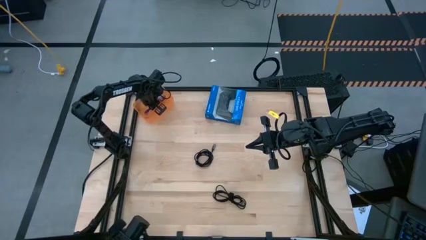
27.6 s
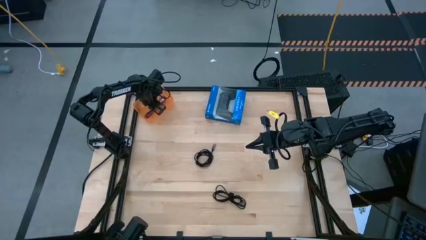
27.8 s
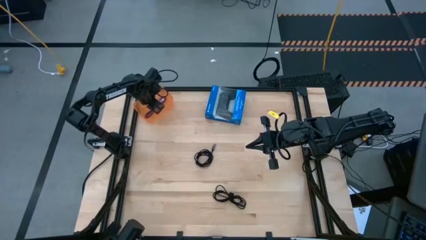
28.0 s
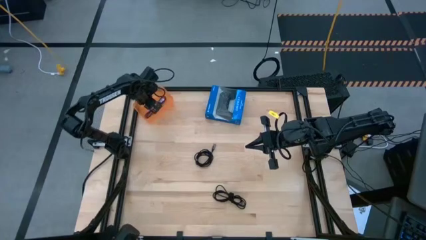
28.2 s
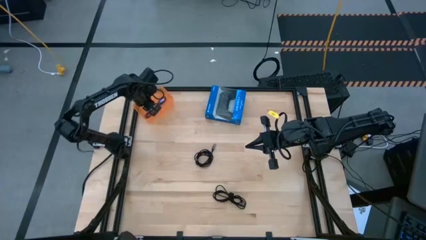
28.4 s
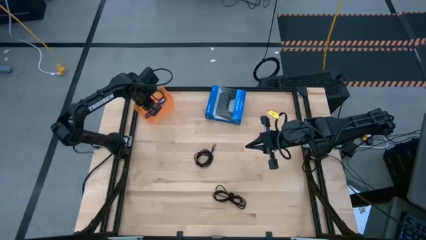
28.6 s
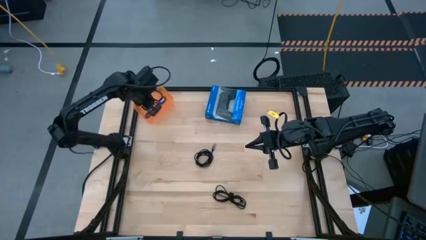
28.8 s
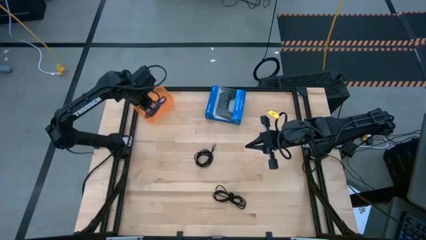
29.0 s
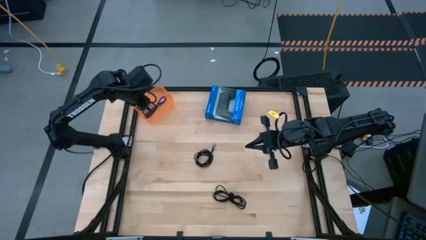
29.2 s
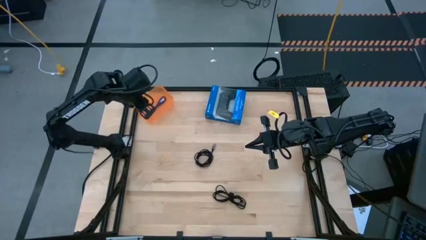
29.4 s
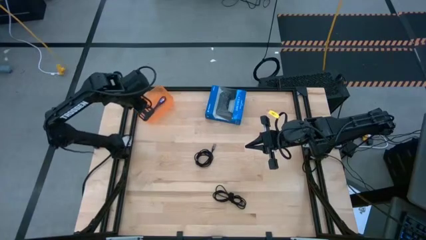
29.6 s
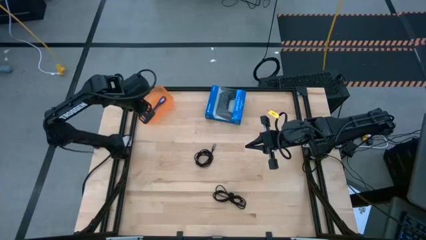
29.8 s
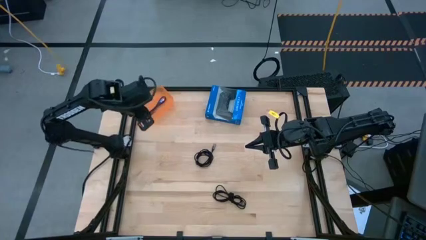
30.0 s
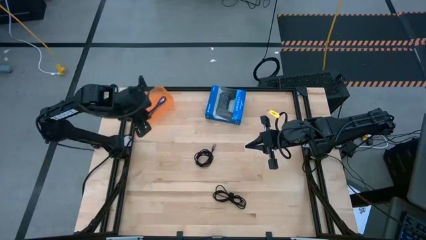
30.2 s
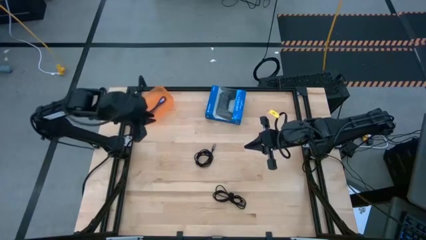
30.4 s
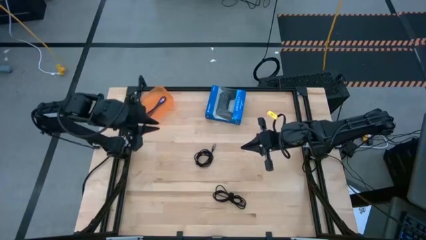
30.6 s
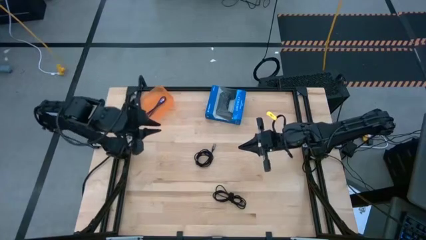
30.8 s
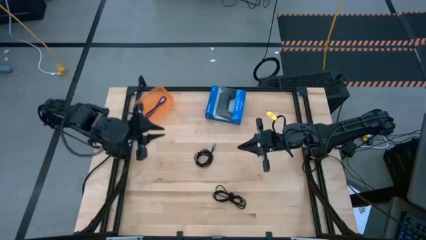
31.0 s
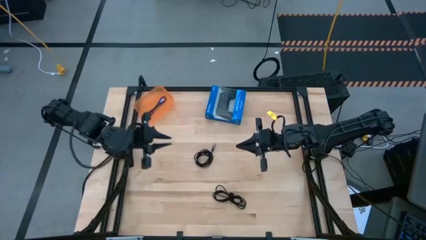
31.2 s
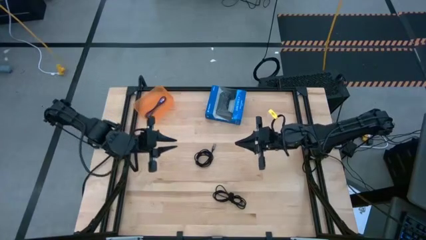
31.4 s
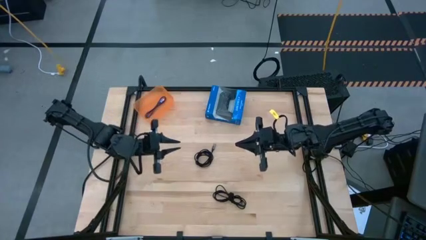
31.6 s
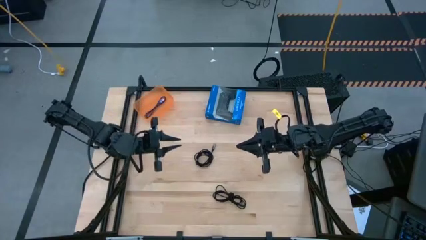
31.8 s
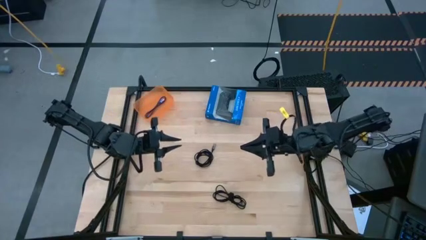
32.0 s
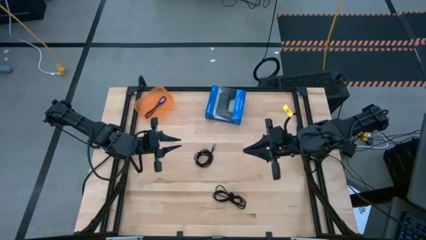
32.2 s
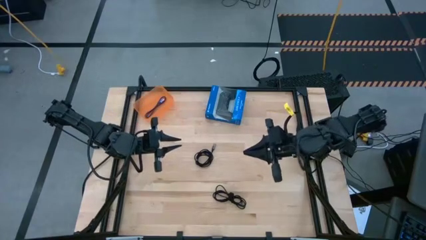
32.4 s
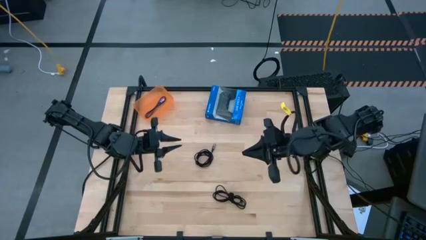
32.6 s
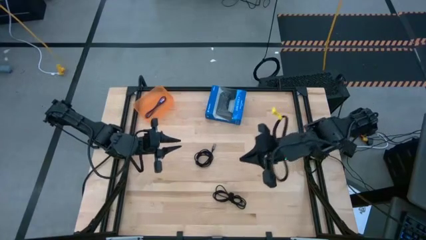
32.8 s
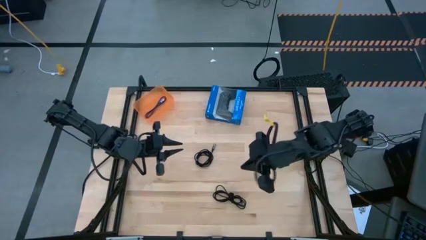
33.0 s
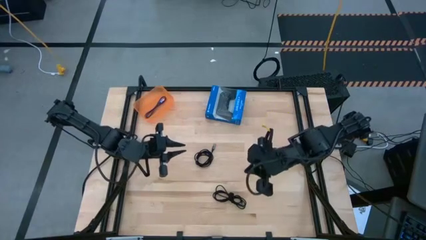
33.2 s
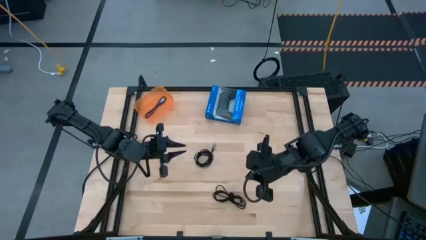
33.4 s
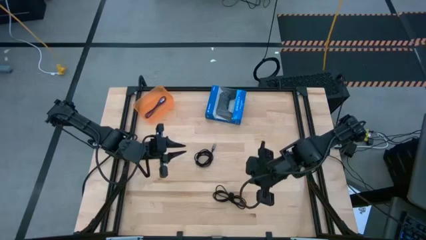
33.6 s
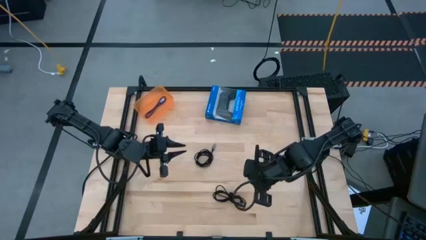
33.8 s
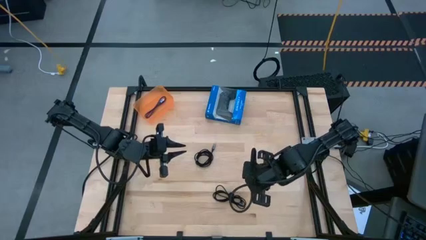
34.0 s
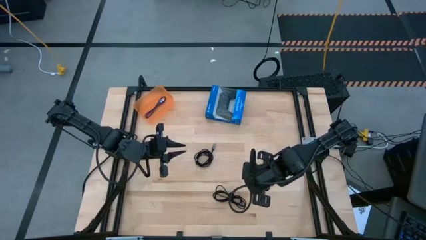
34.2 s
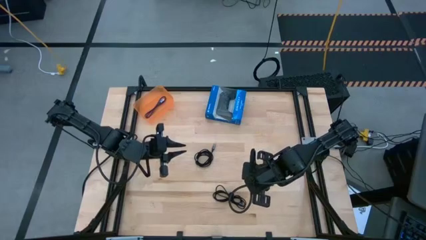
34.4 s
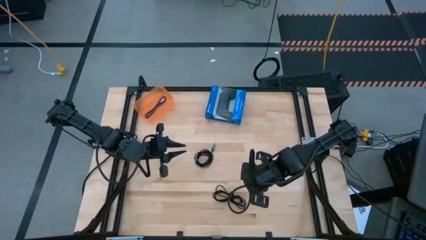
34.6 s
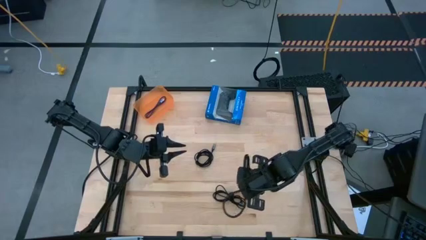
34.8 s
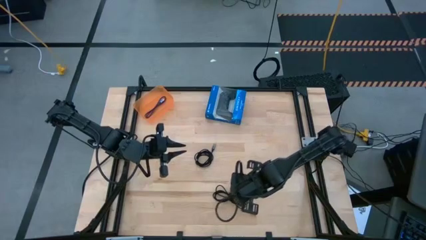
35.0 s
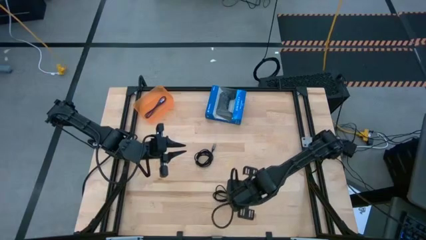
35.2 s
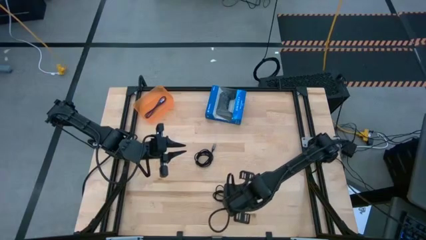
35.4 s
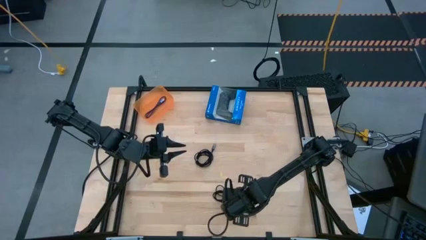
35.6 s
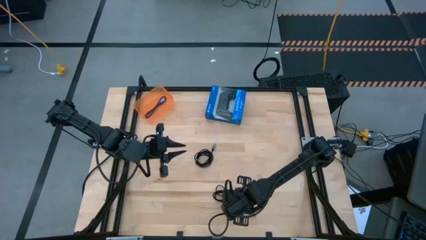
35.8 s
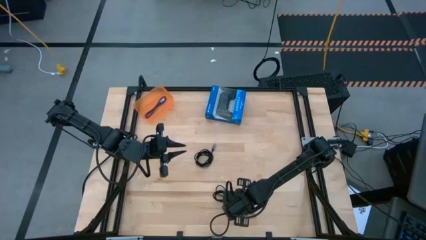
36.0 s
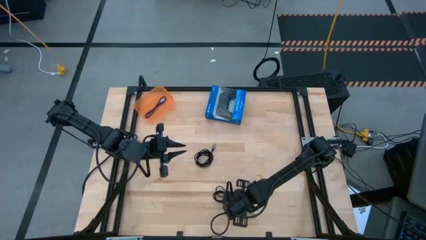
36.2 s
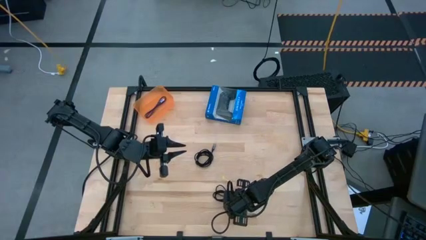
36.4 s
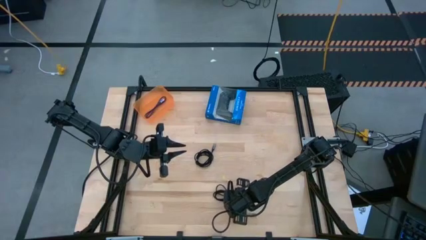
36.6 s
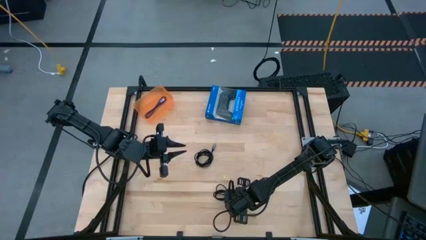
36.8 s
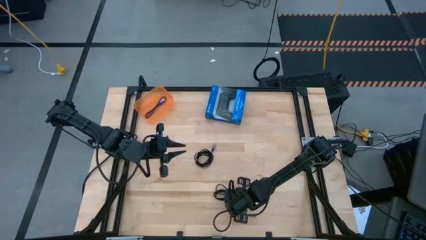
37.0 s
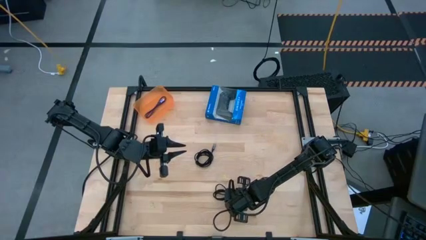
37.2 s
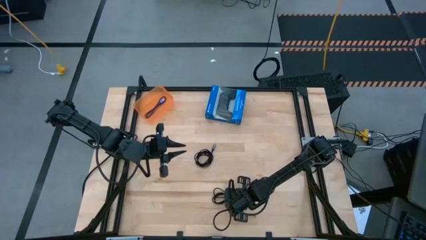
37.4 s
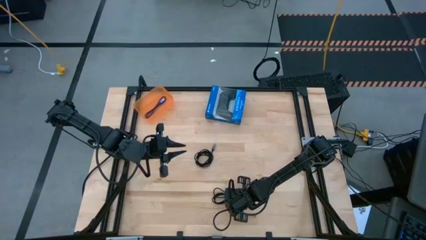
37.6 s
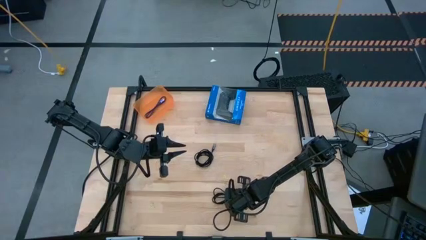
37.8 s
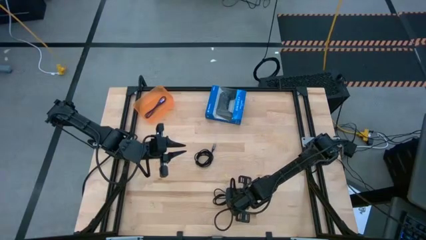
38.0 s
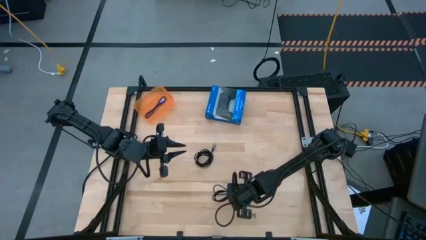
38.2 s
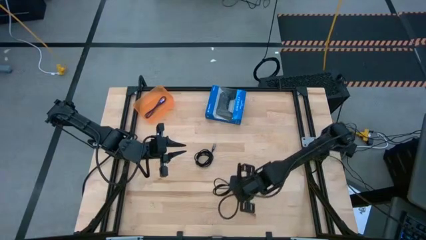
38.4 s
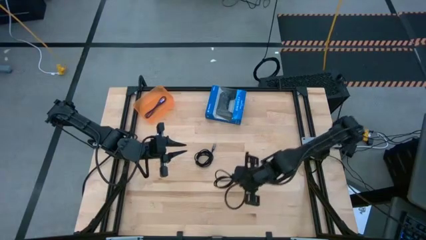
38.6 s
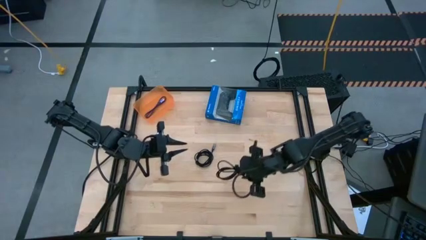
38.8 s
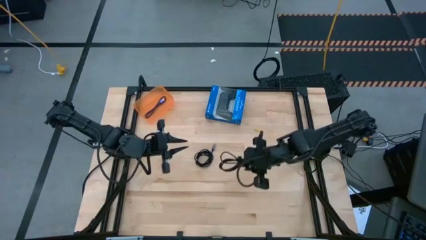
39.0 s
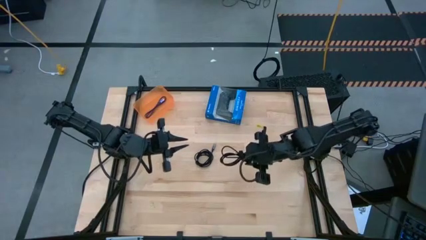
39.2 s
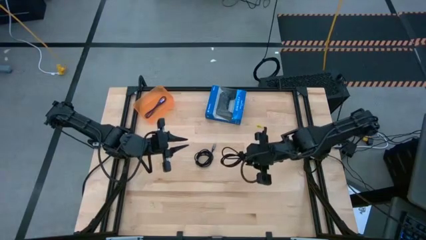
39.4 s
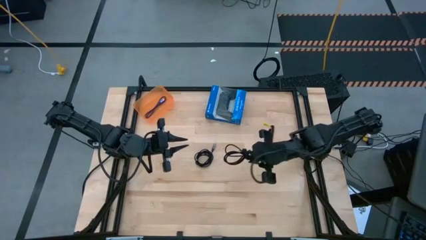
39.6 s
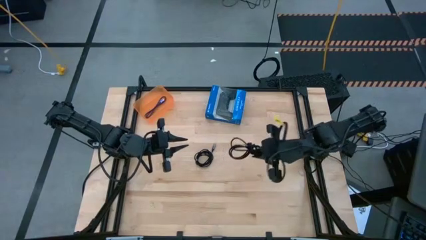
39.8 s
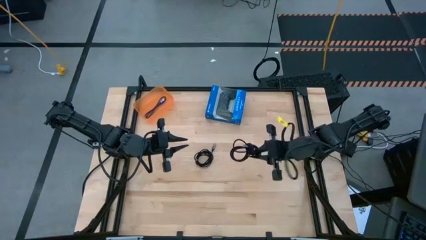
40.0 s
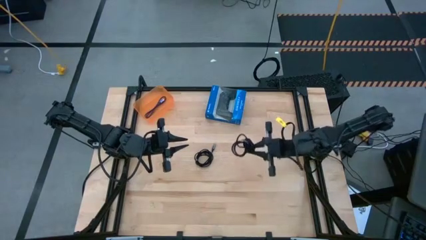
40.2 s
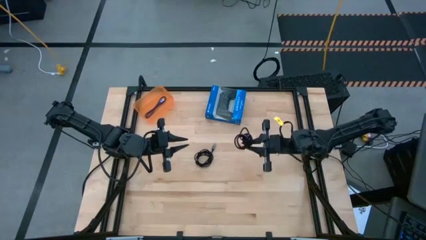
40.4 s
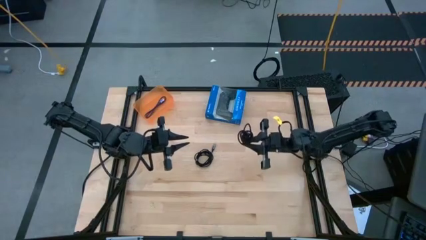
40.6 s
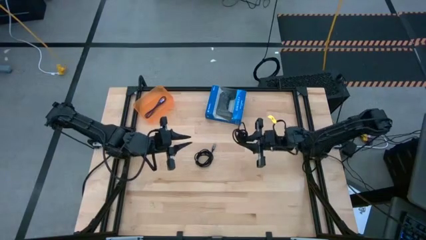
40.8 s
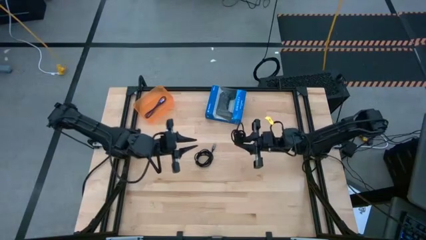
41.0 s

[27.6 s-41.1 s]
Task: Pick and place USB-C Cables
Put the bottom black charger cable into the orange bin

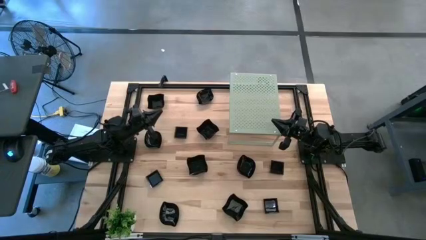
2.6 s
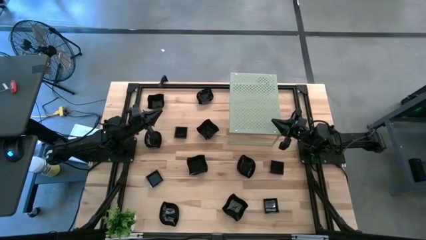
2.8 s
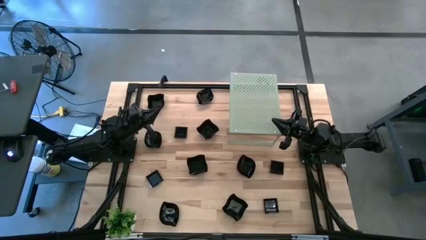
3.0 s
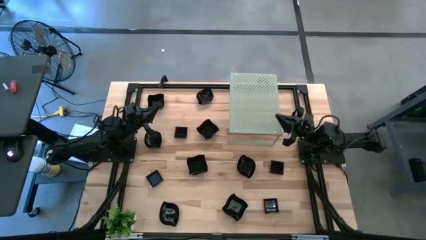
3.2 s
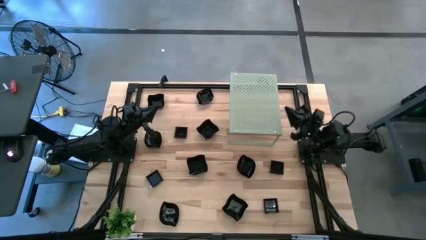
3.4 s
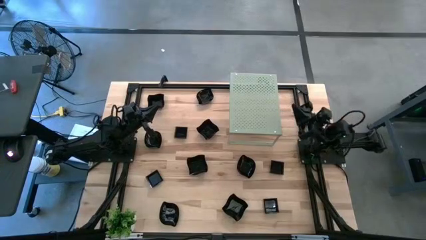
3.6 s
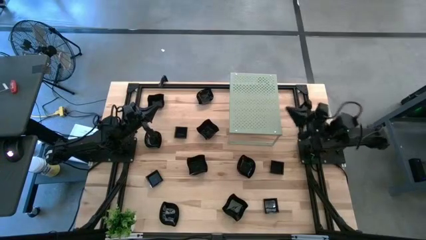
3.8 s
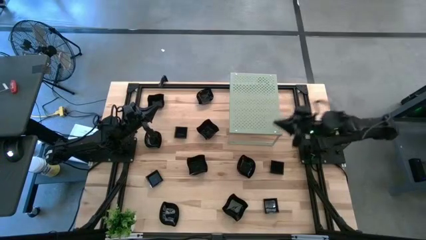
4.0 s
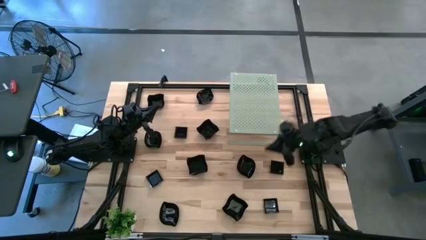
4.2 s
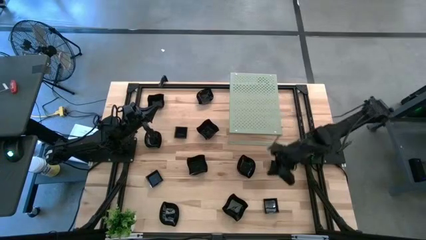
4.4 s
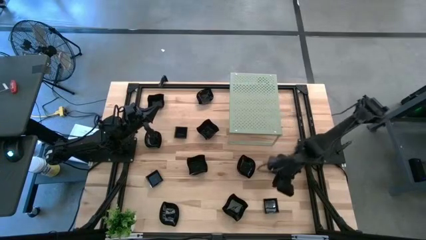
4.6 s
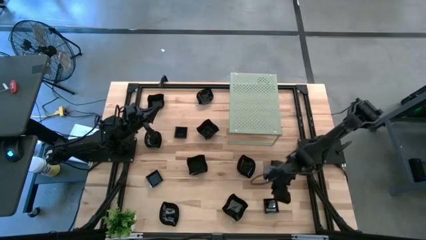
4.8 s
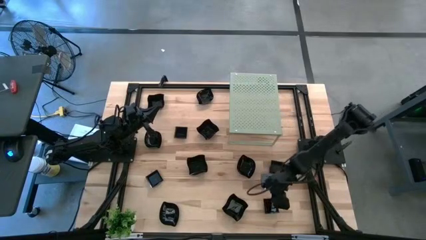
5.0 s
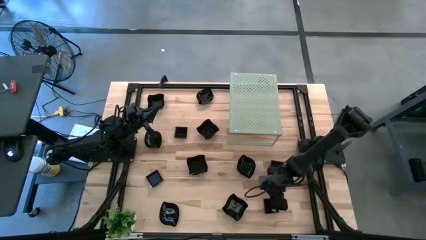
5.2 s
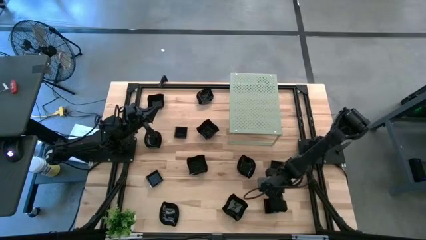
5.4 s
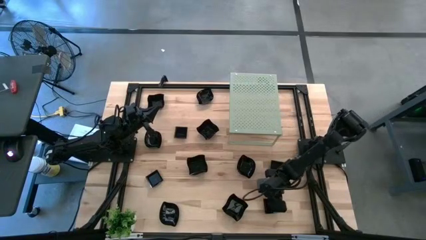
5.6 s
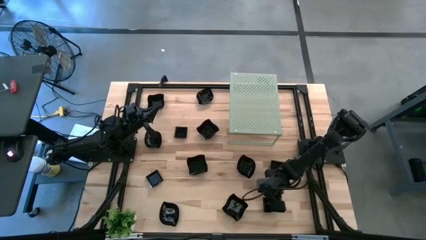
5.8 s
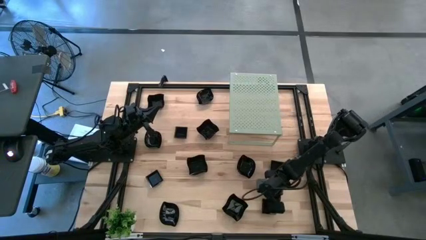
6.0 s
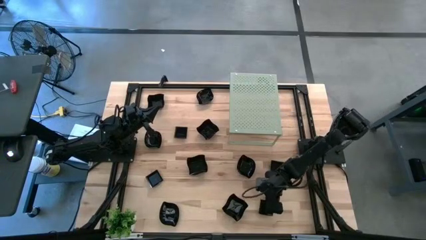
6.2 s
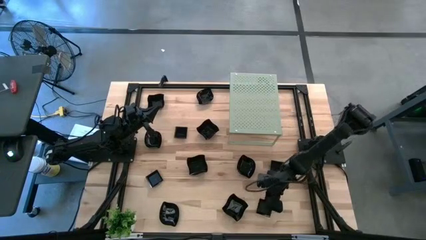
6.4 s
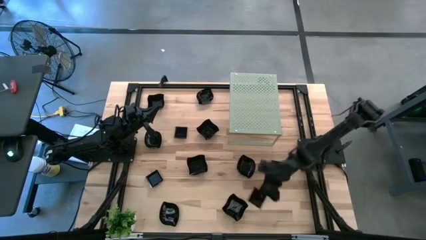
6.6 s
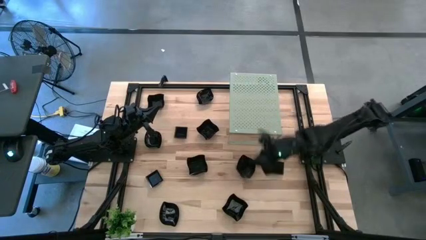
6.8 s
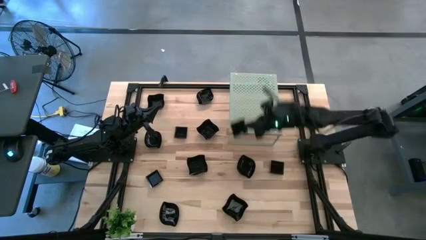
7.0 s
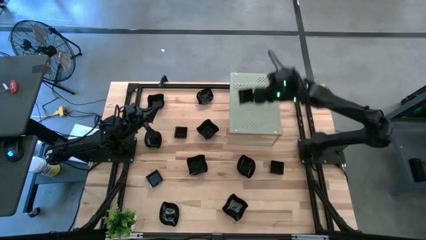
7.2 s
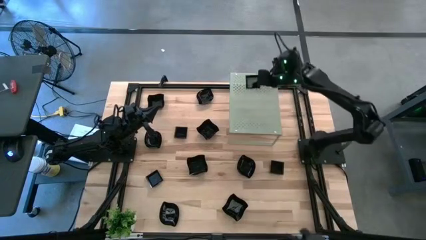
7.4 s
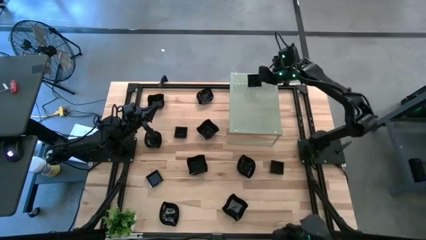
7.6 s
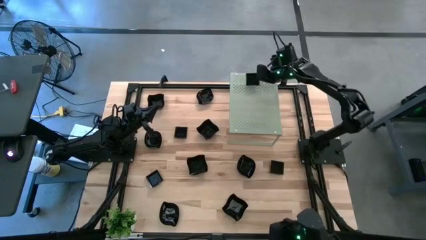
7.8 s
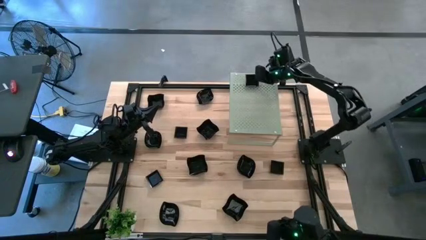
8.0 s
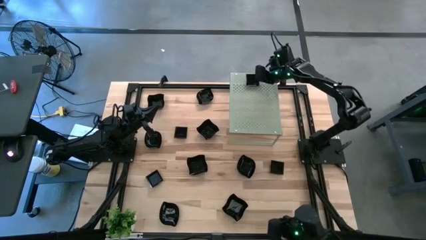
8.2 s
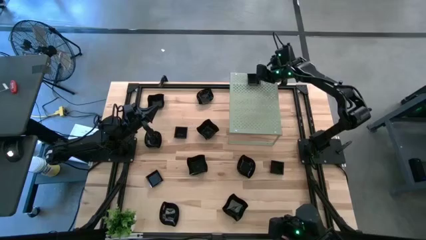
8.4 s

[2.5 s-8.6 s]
Task: Pick & Place Mini shaped plates
Put the black square plate on the shelf
